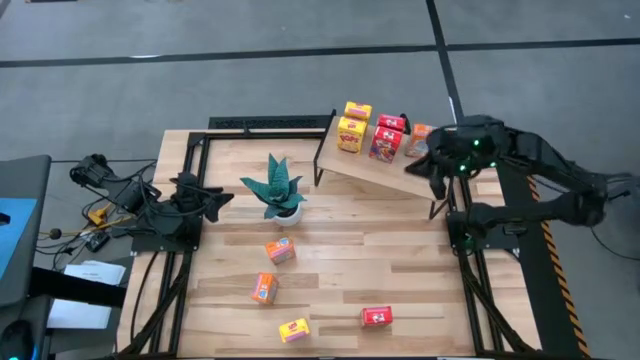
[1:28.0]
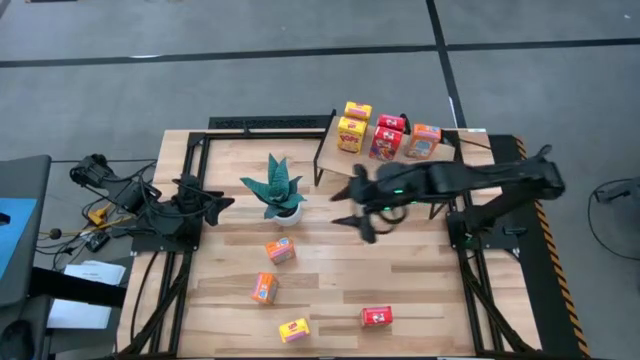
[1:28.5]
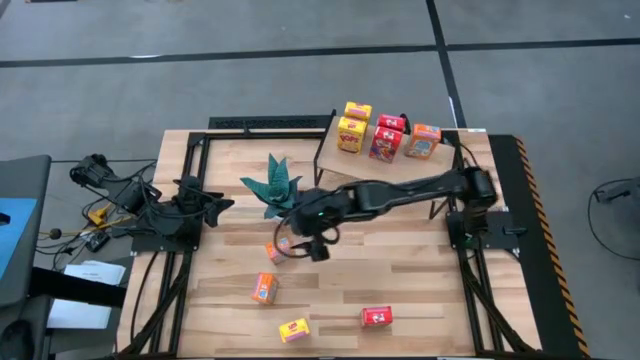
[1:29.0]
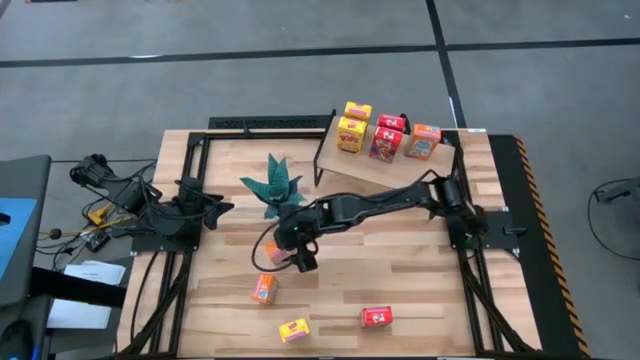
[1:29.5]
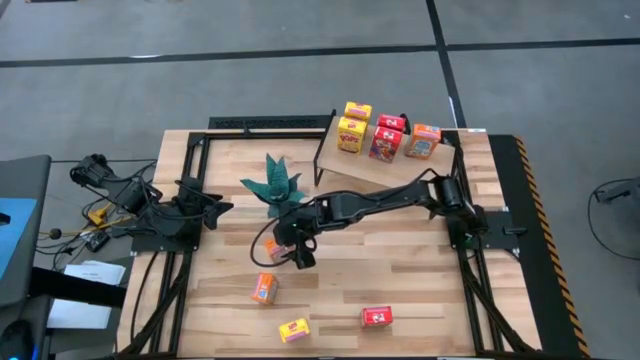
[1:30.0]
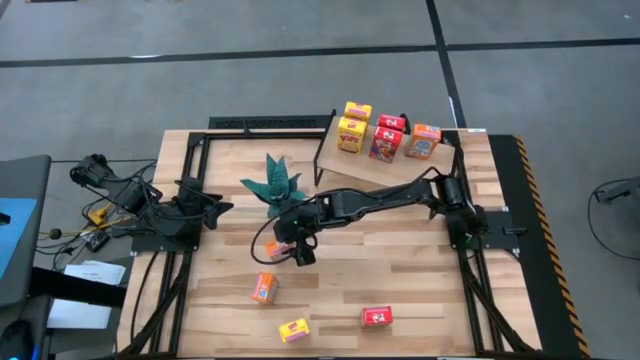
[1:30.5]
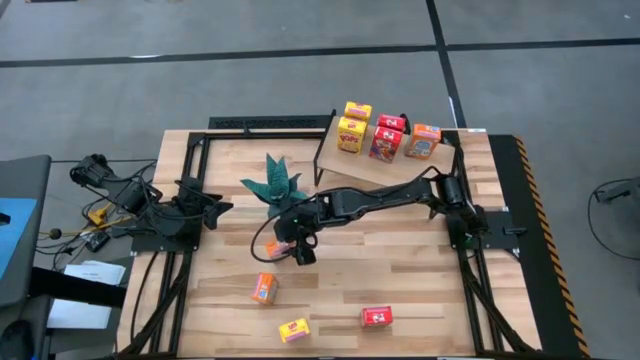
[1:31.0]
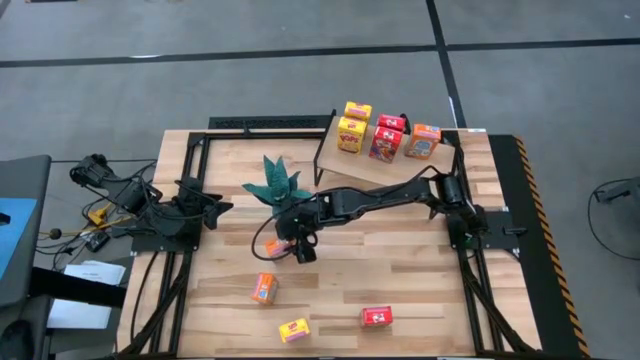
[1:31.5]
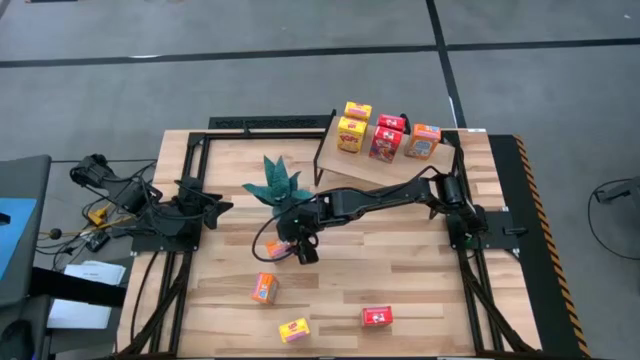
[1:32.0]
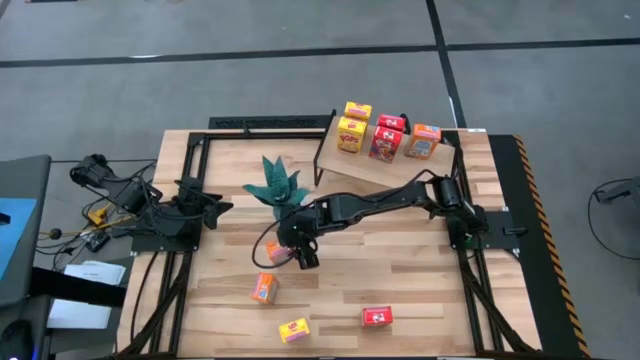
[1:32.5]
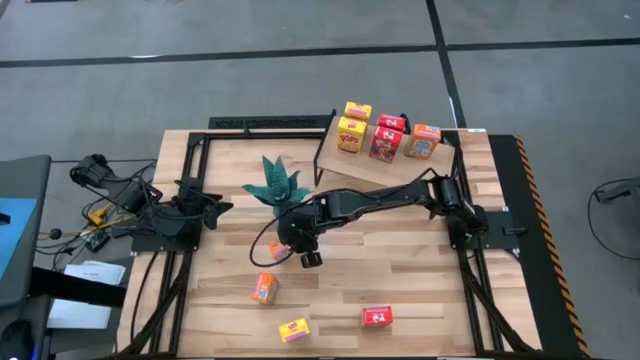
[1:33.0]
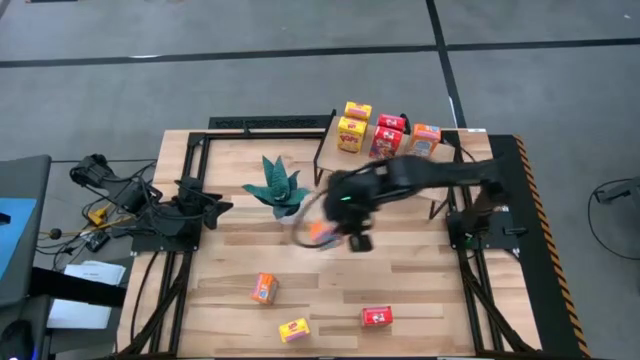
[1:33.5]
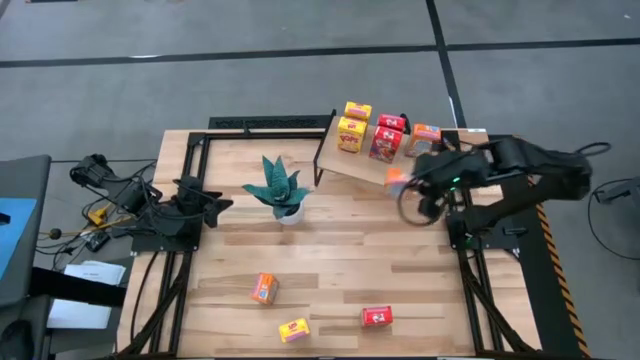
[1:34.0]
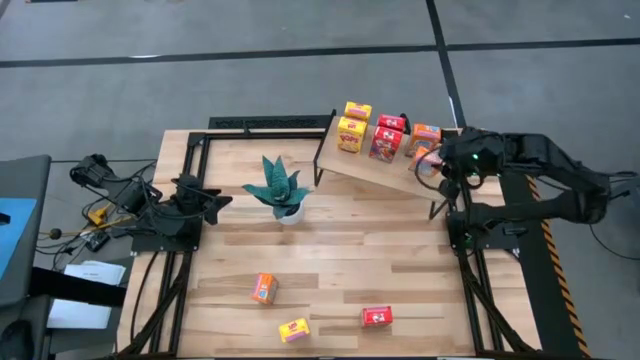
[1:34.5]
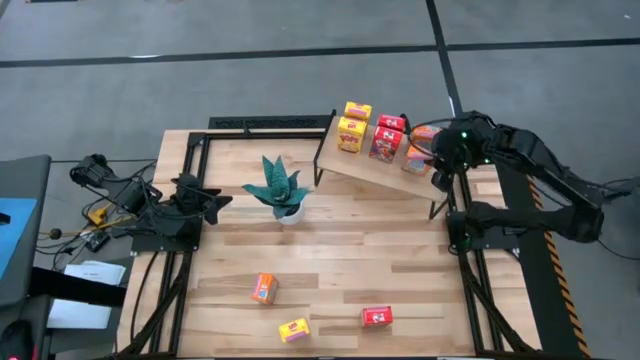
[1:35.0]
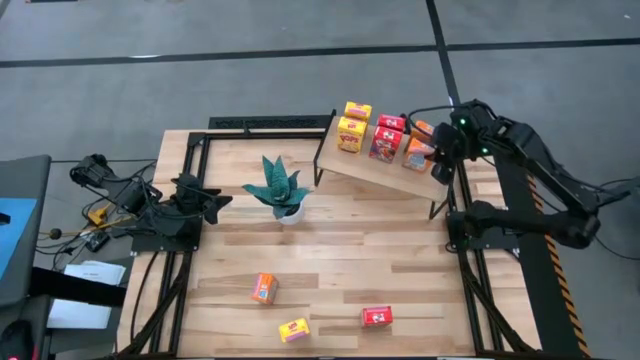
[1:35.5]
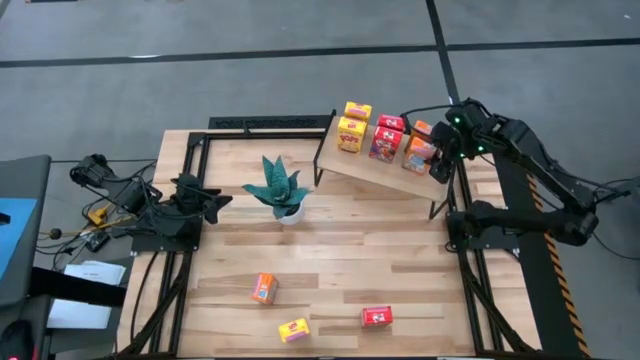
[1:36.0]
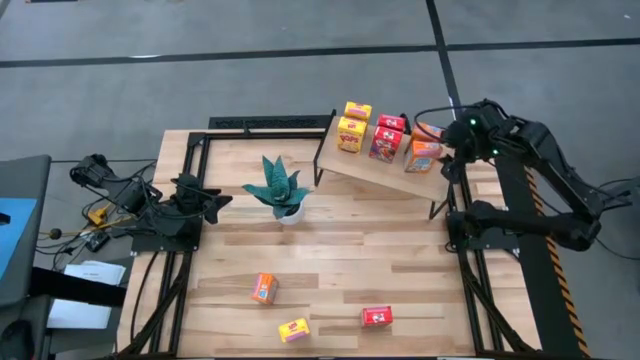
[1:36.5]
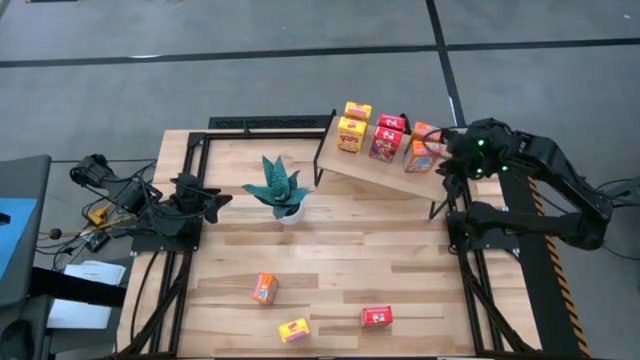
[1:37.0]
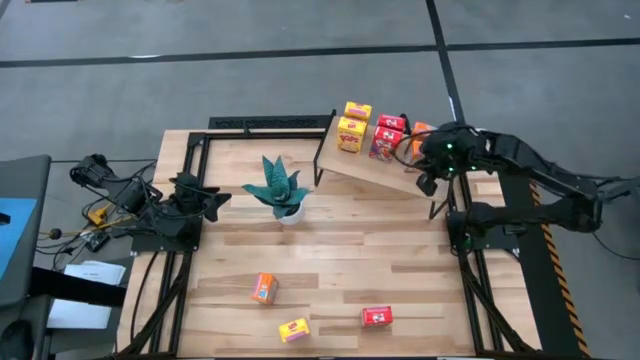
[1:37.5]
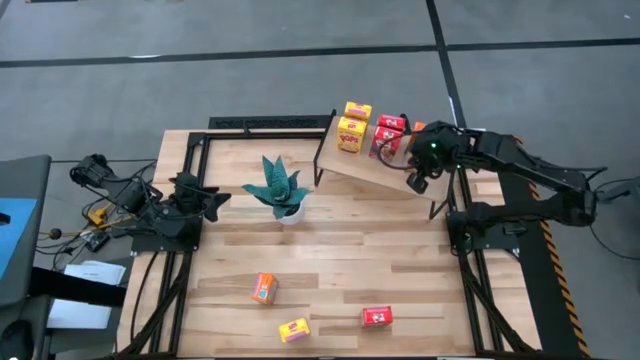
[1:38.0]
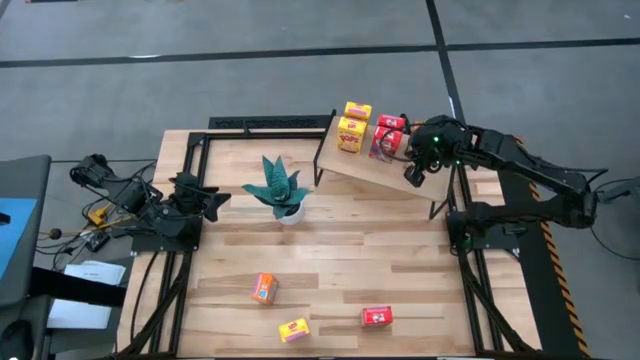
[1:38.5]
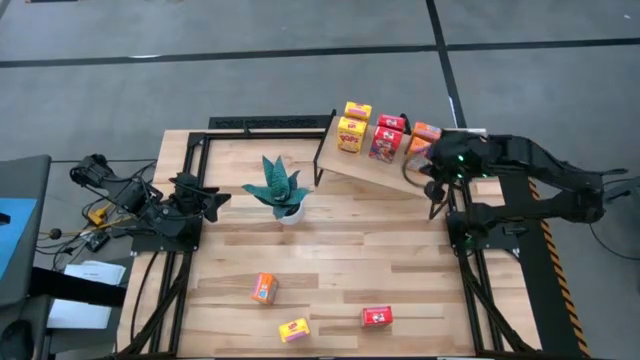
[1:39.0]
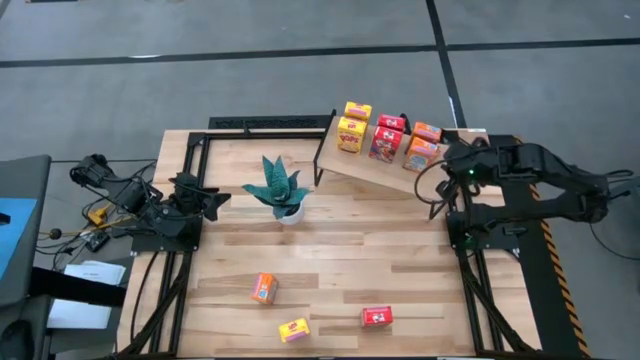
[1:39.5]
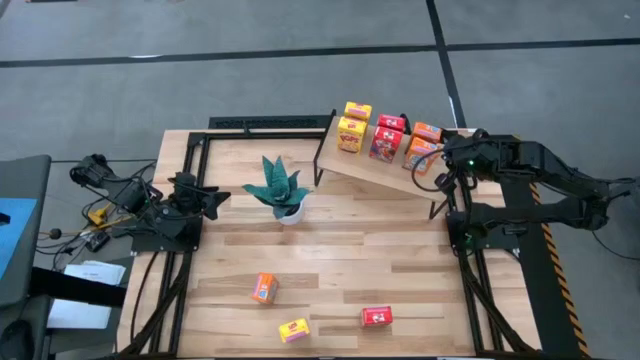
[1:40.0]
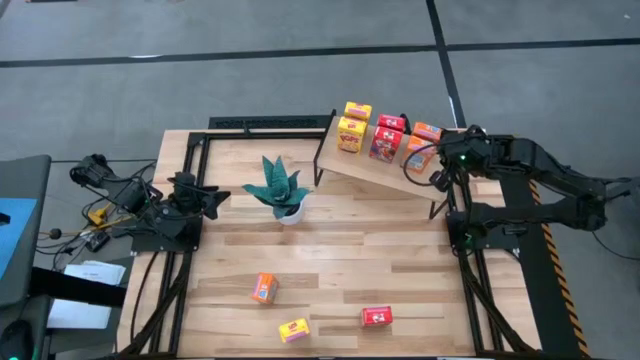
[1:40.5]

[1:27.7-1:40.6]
Task: Stack cereal on shelf
Put the top orange cereal box on the shelf aligned with the other orange cereal box

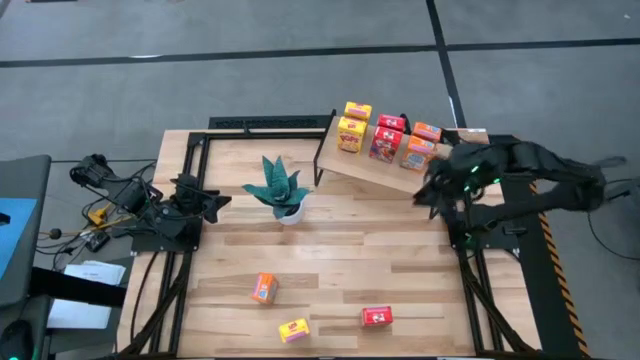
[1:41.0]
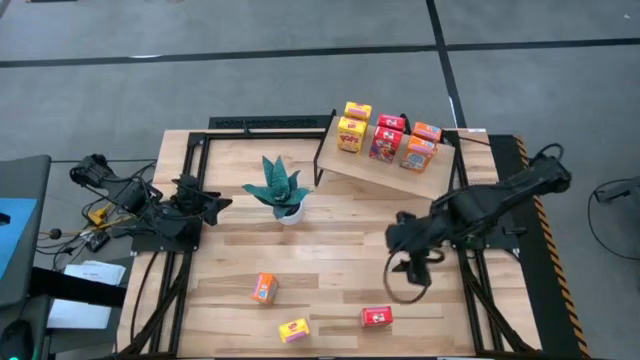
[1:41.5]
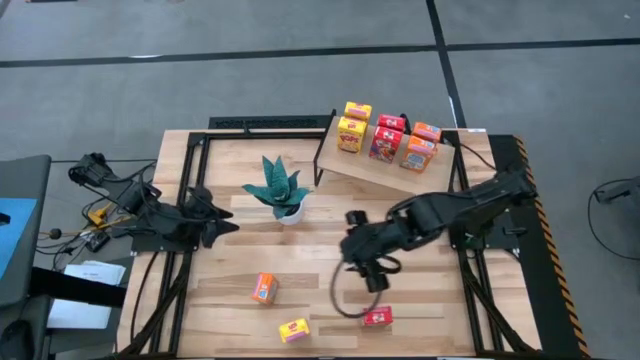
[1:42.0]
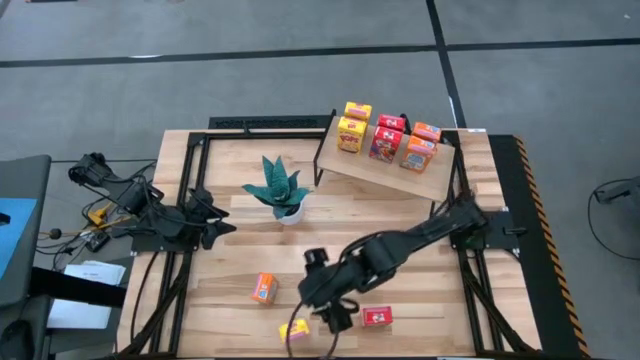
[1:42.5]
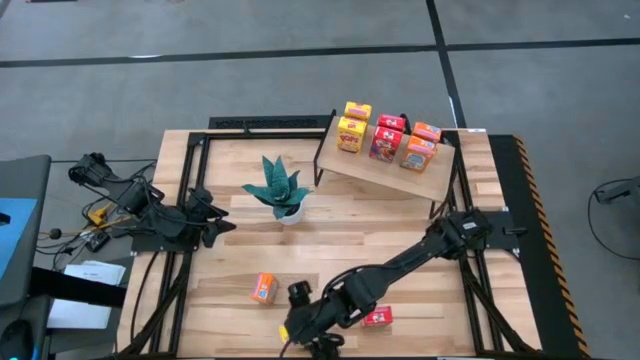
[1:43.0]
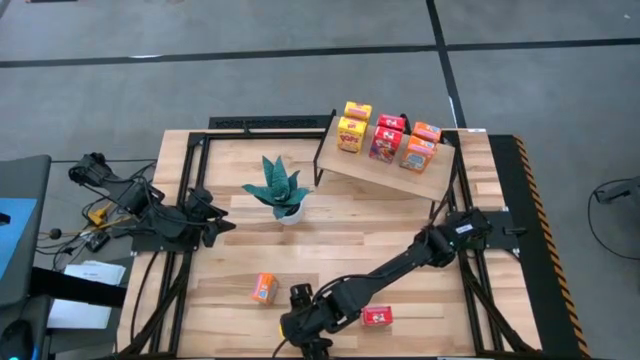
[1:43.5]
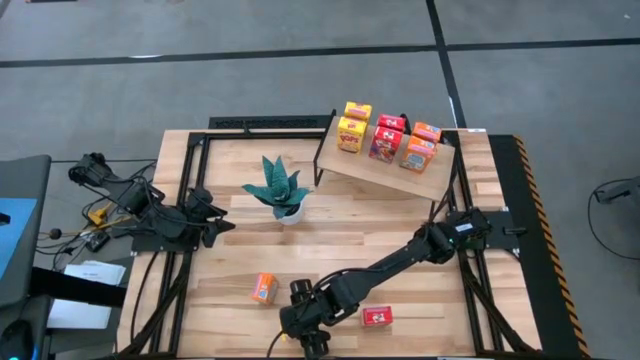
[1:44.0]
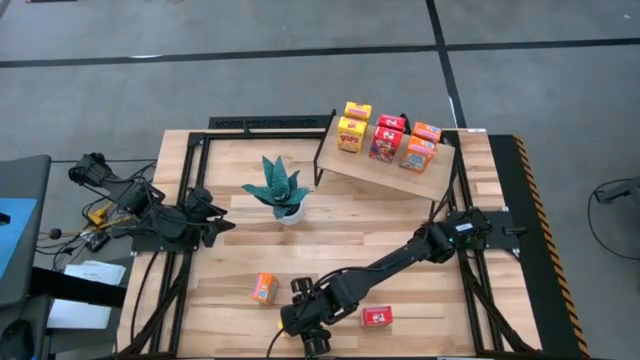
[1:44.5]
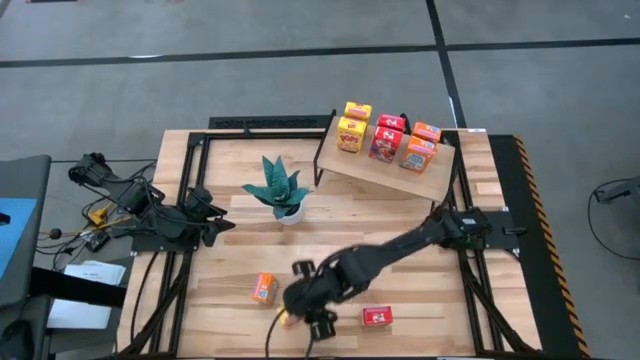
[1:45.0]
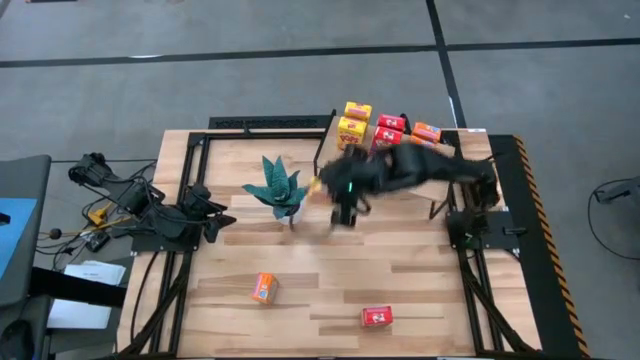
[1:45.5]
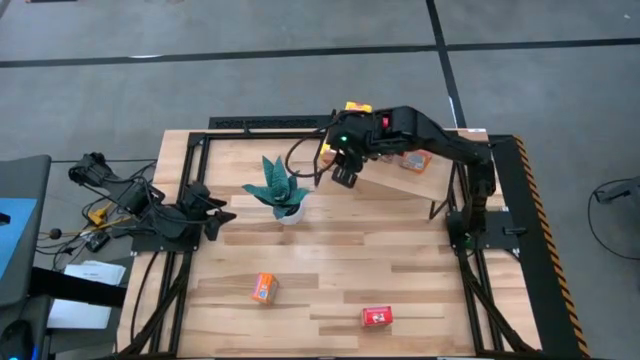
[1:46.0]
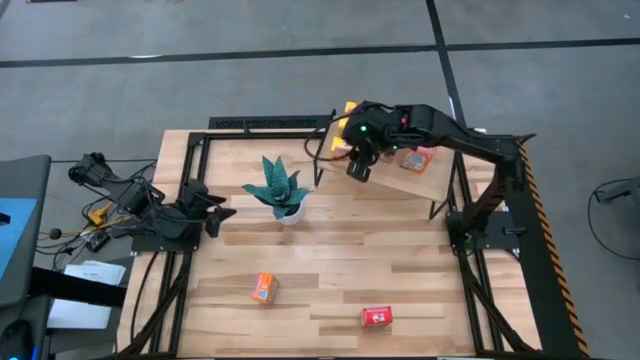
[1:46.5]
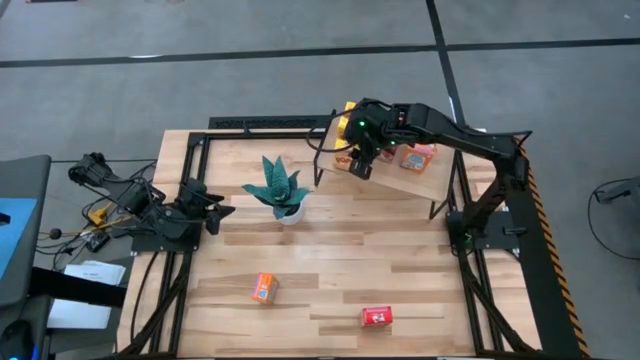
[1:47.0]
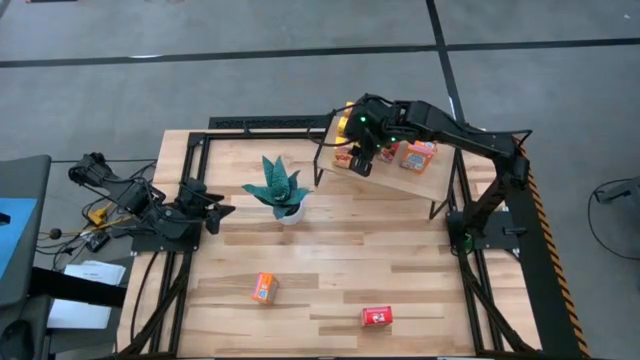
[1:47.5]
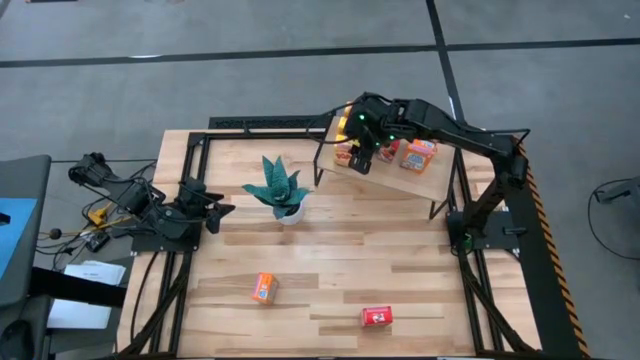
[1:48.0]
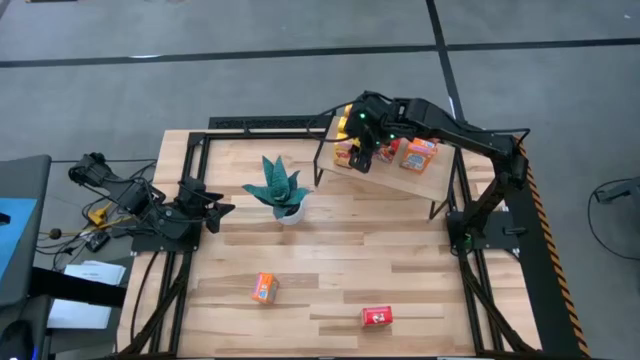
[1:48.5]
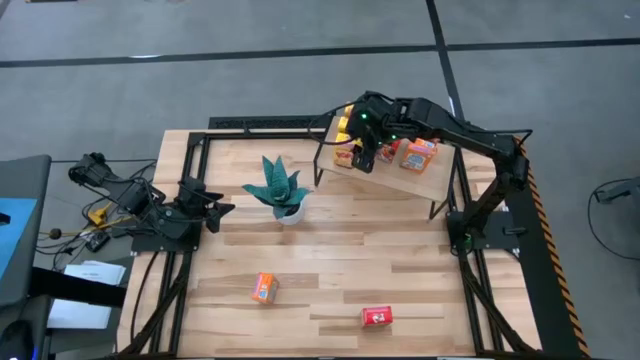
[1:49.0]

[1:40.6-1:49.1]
Put the yellow cereal box on the shelf aligned with the other yellow cereal boxes
